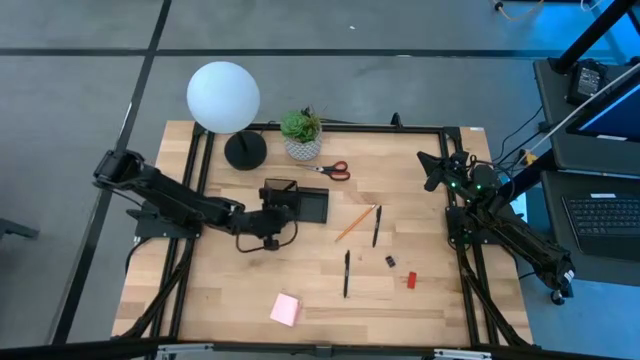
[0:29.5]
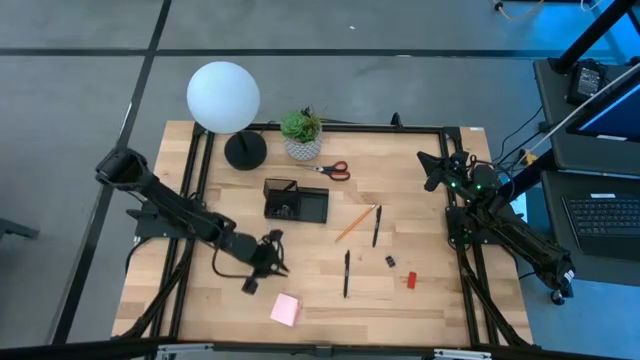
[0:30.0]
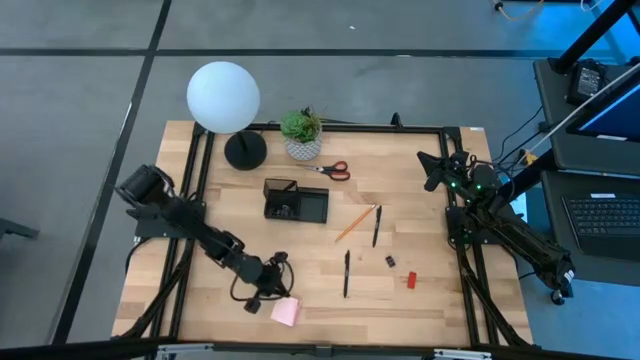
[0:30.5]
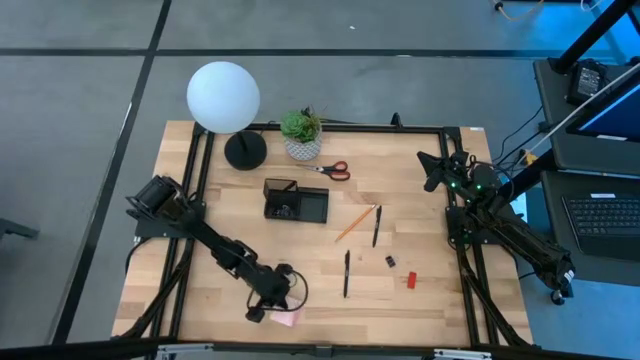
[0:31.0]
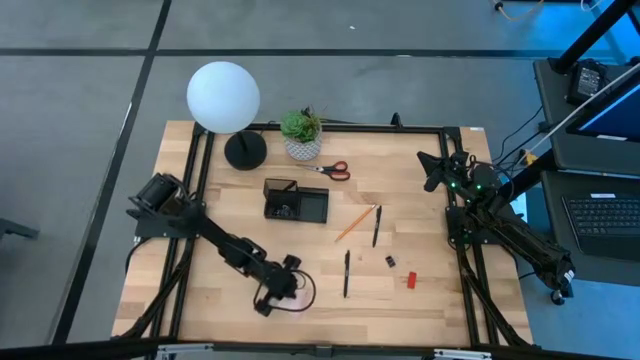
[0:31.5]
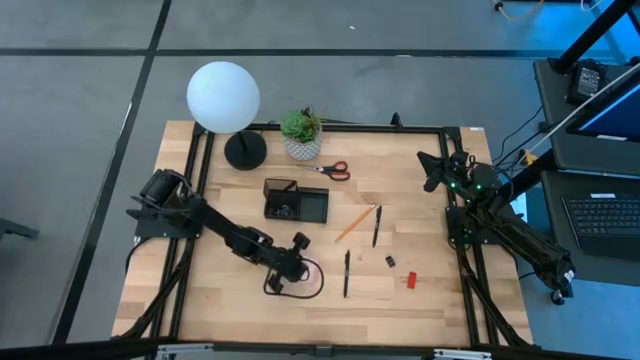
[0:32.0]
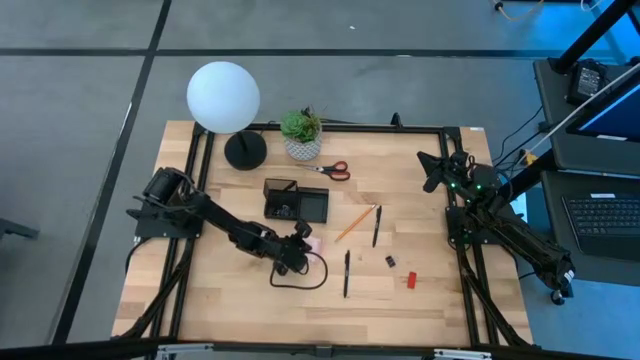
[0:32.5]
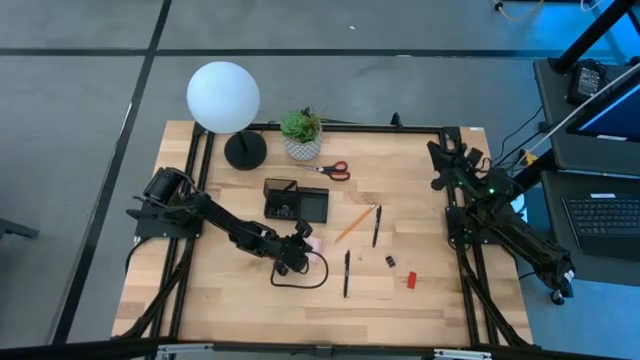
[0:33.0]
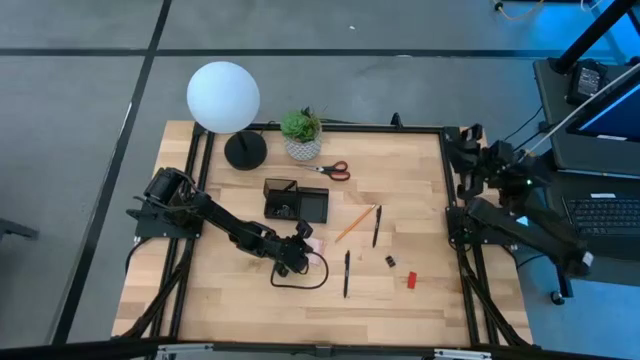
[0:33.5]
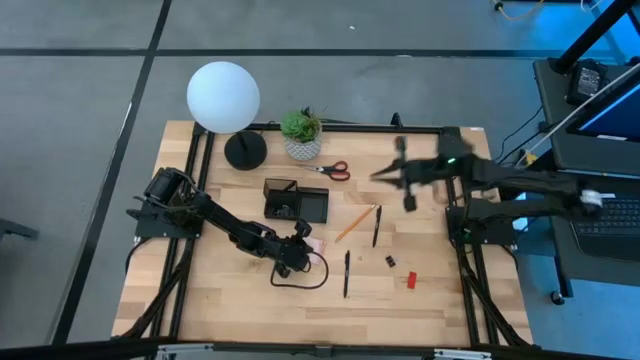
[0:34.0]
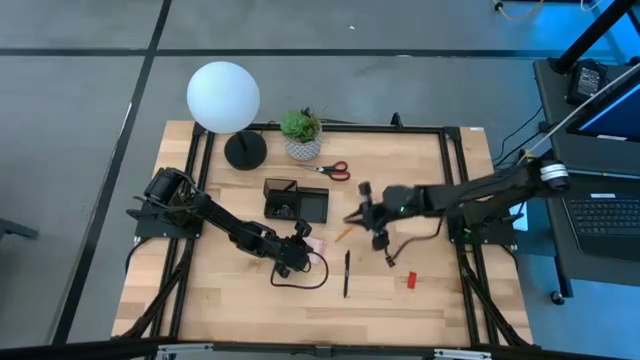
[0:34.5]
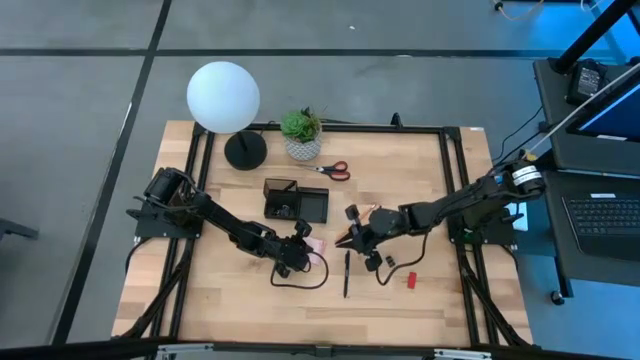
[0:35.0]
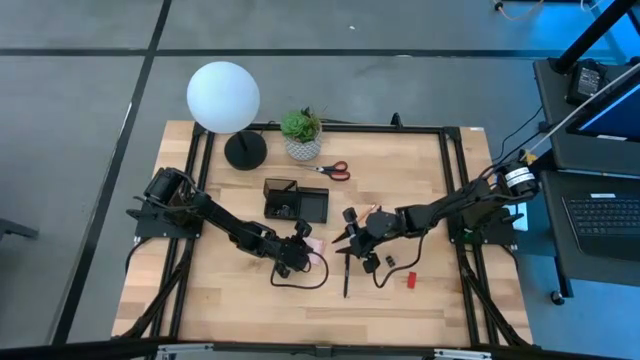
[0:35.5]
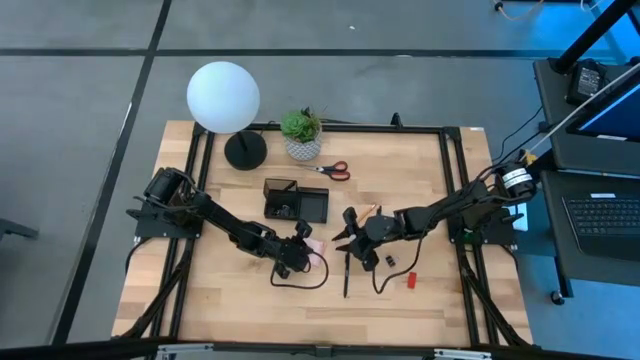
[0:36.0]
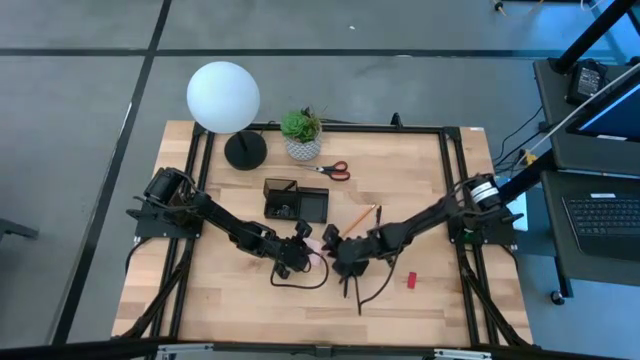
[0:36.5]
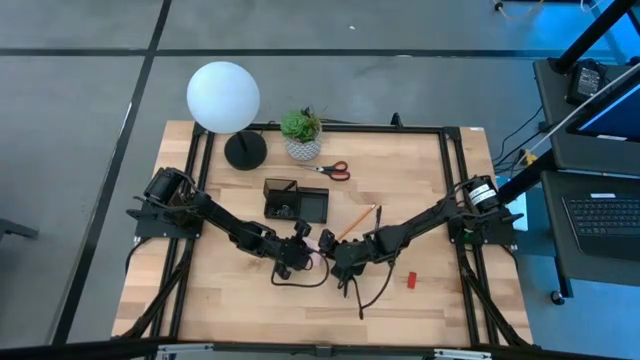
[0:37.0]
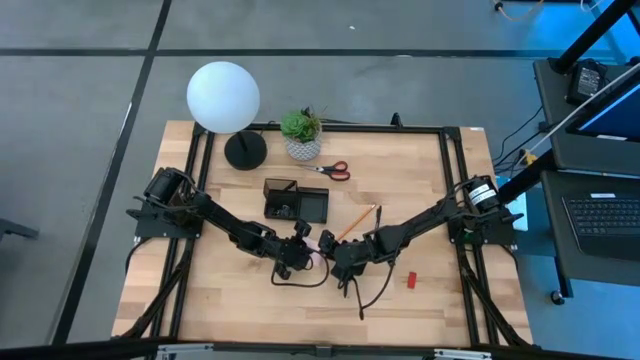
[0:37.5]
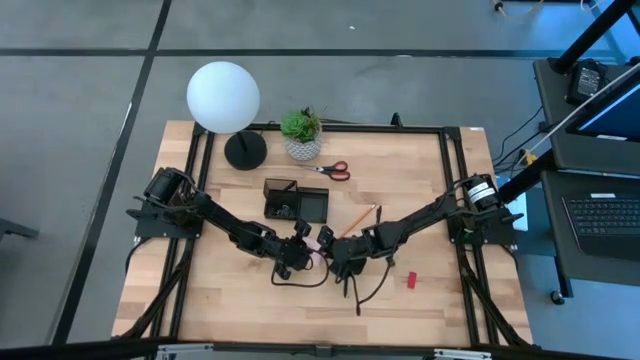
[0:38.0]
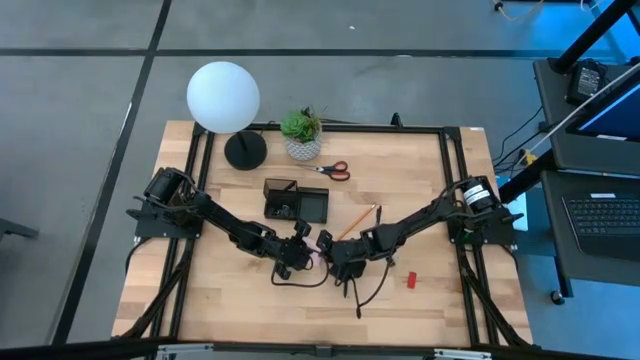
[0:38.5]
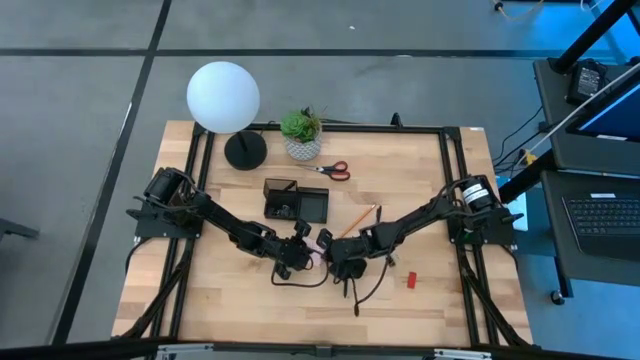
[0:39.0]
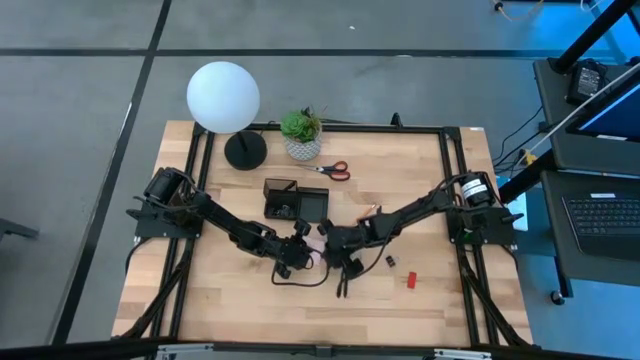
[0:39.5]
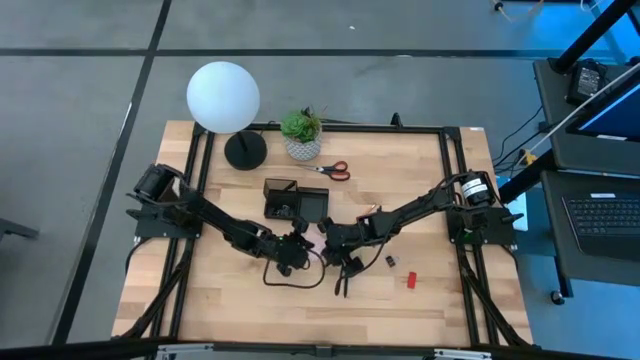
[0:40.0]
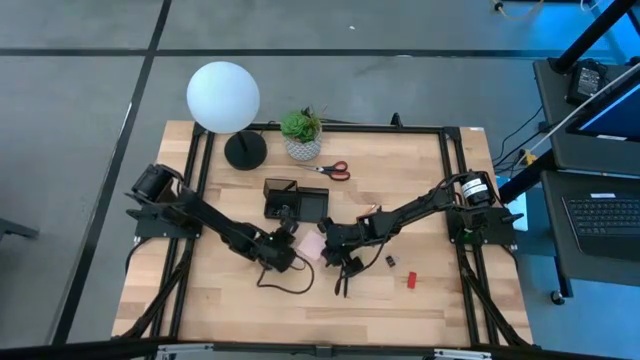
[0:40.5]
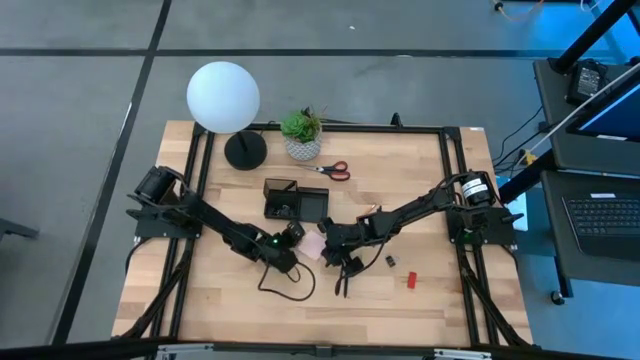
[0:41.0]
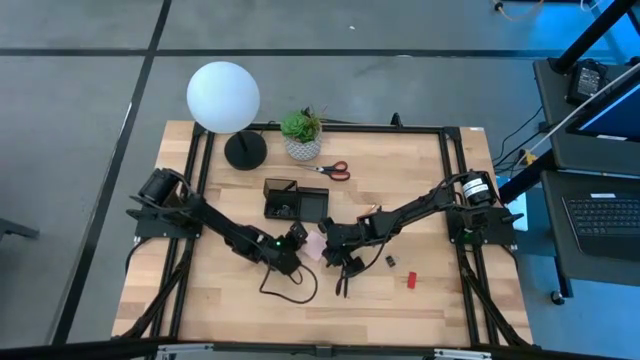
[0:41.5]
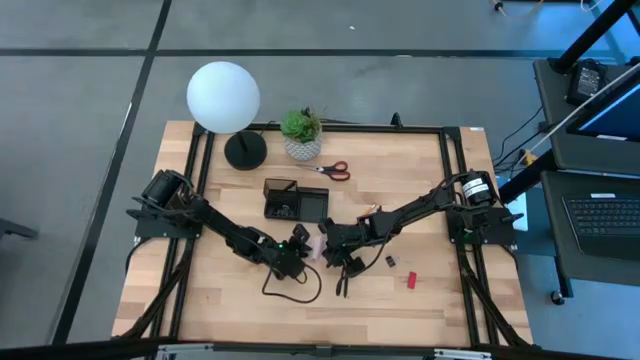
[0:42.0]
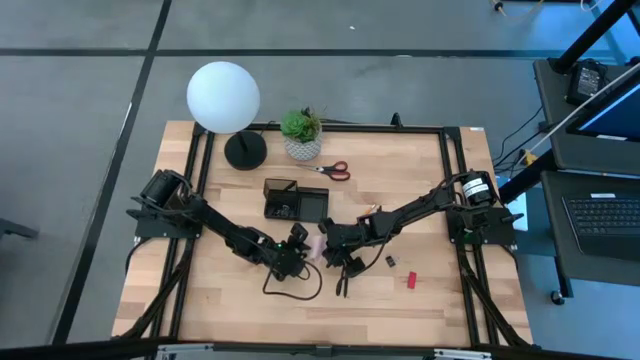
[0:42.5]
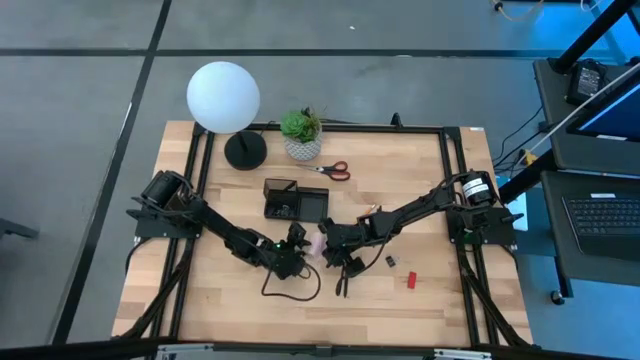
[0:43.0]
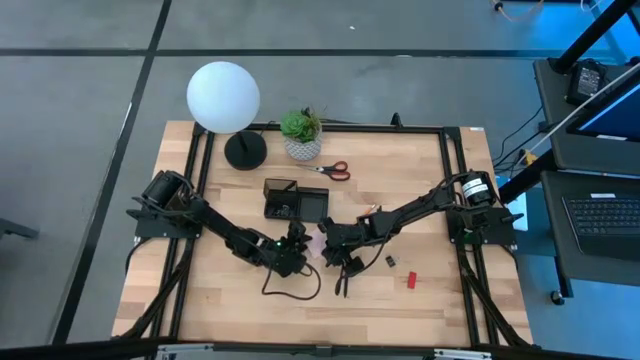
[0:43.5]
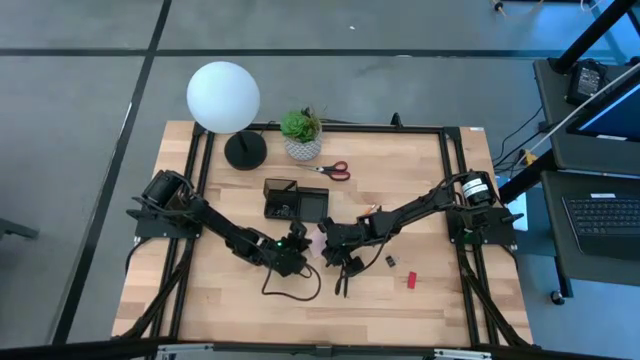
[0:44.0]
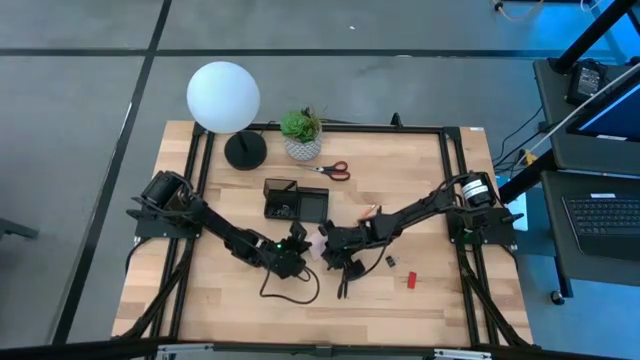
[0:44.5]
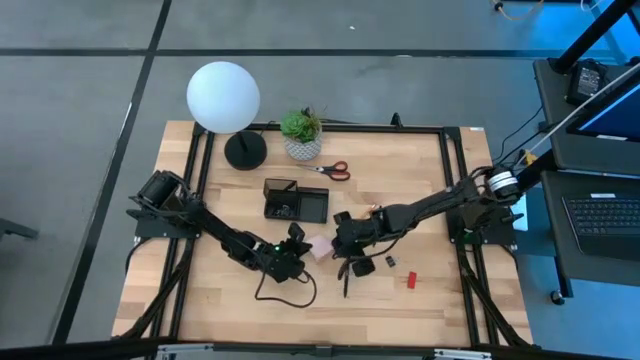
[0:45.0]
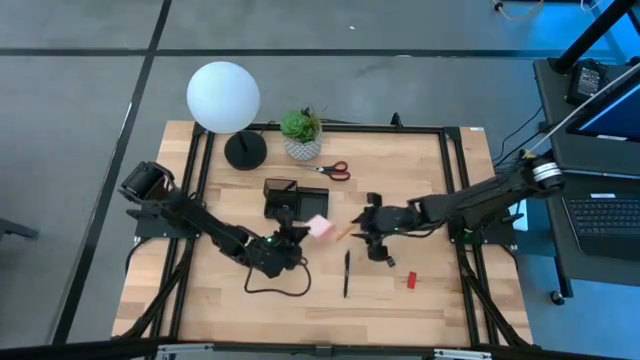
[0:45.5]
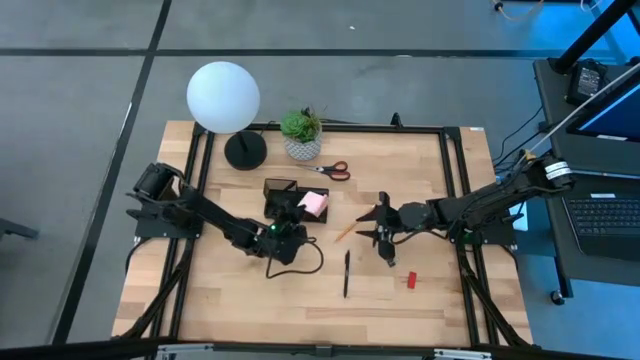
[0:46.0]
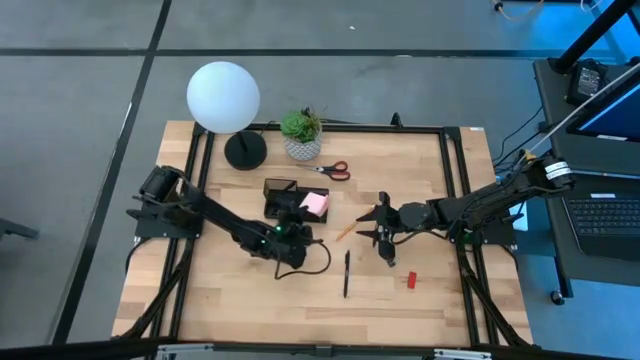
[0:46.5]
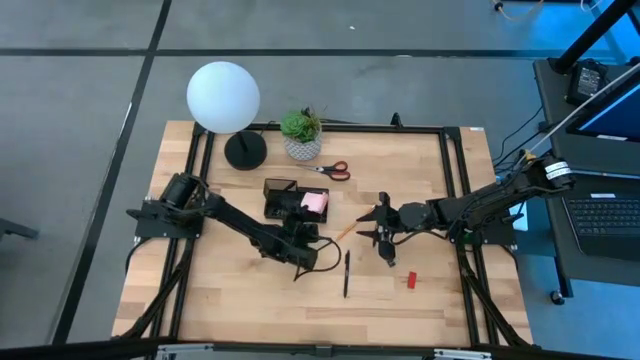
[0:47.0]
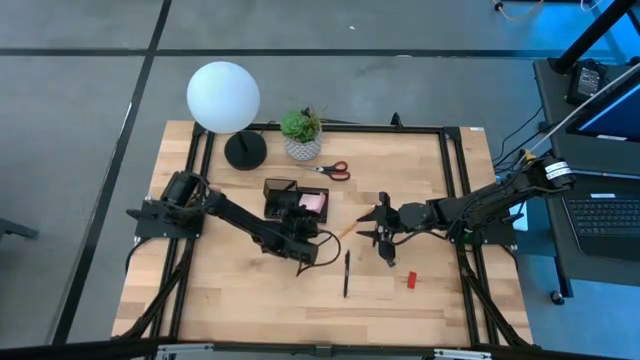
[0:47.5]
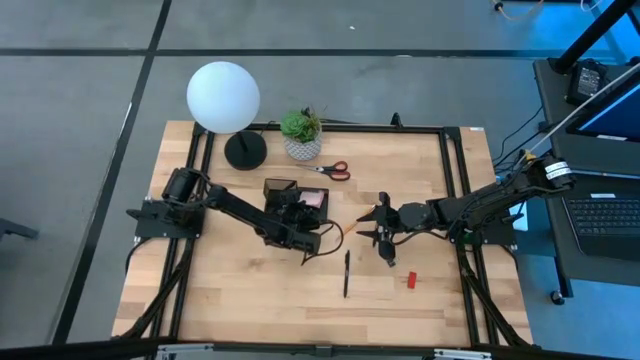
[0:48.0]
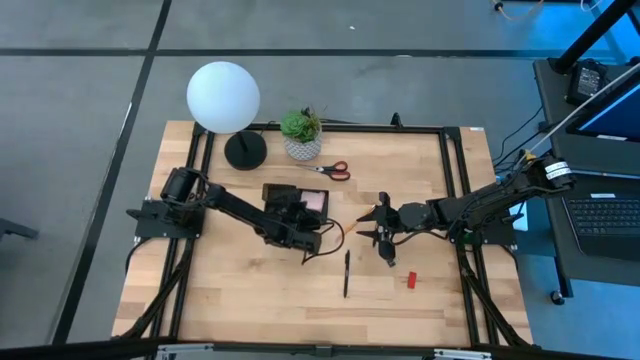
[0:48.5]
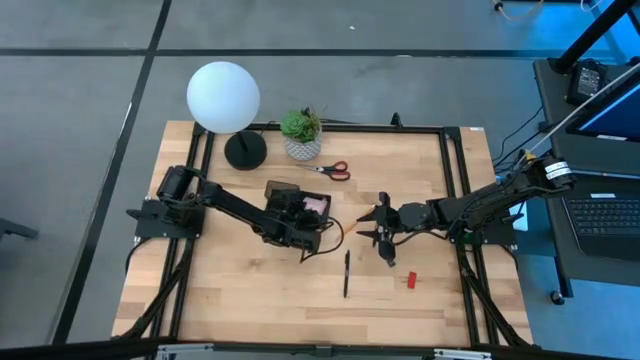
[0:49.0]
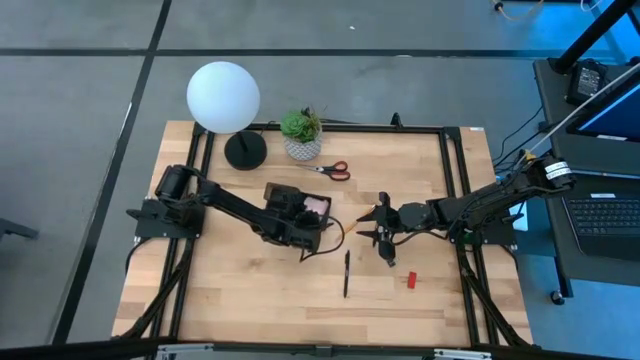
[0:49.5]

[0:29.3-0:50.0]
Task: Pick and place office supplies into organizer
Put the white notepad into the black desk organizer

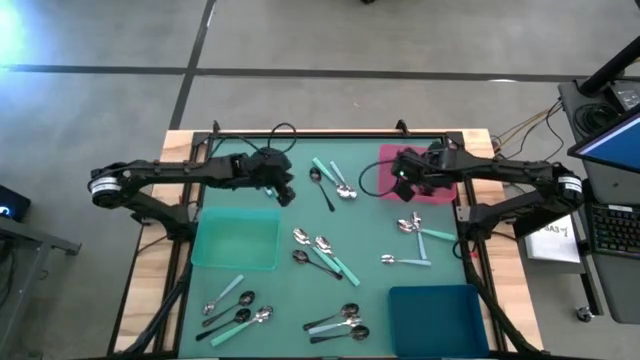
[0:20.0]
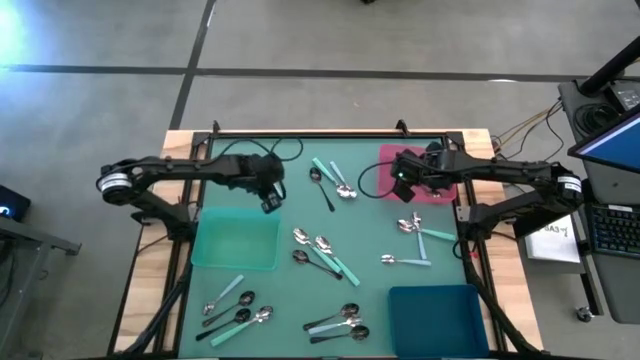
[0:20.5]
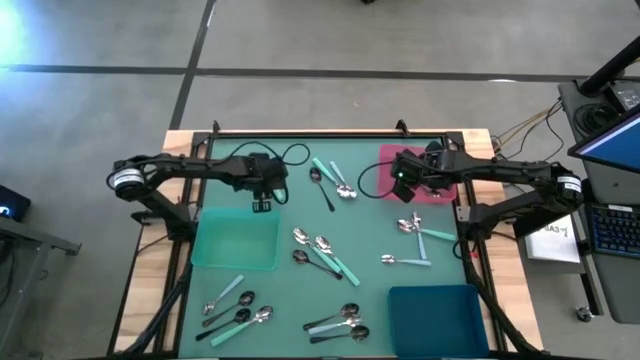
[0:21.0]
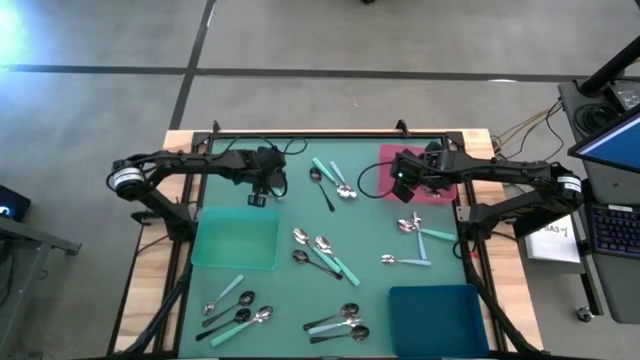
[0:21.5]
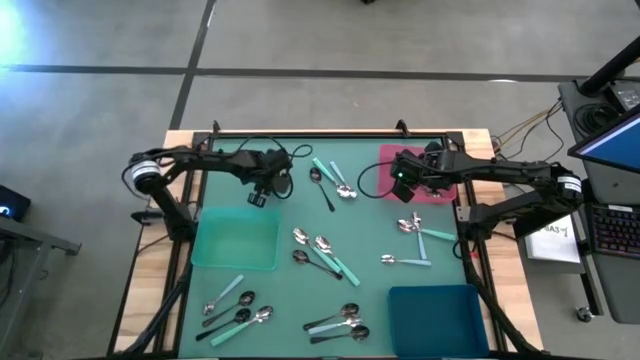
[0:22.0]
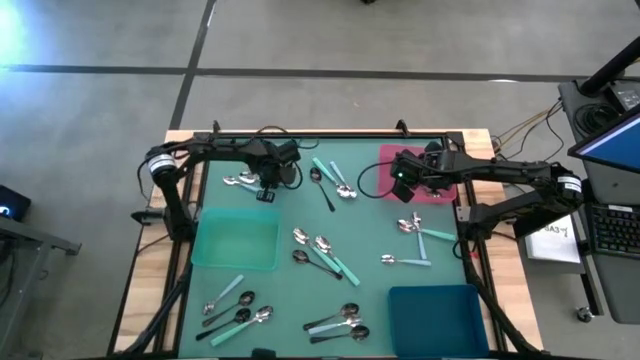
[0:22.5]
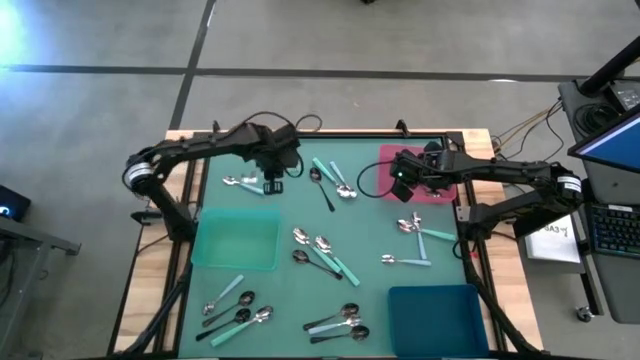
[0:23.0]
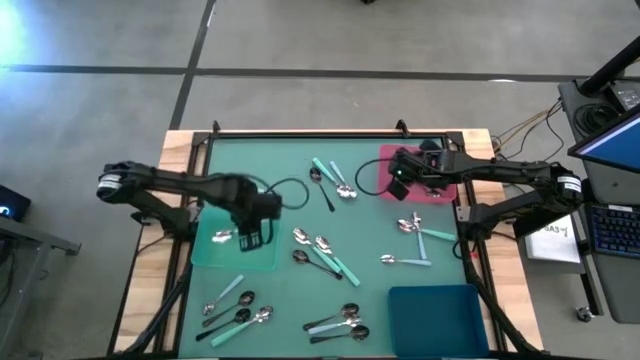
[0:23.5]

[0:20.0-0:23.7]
Task: Sort silverware by color (type)
Put the green spoon into the green bin
